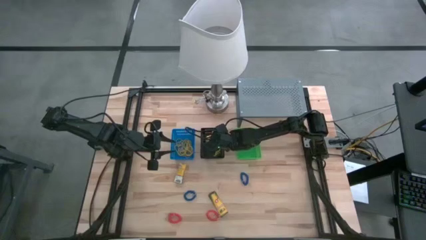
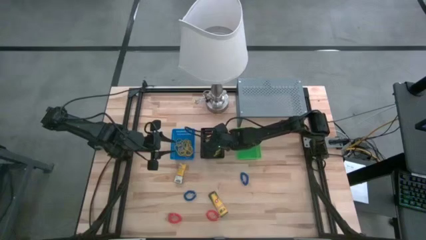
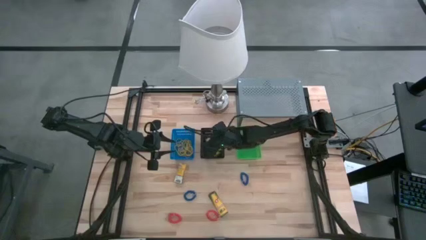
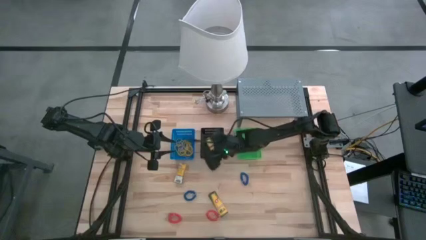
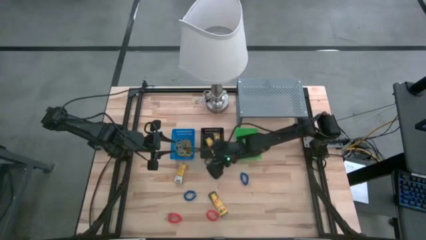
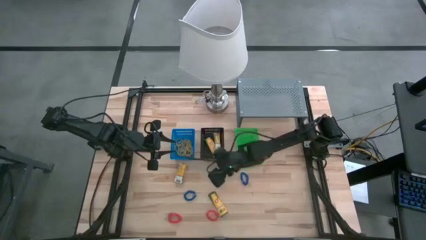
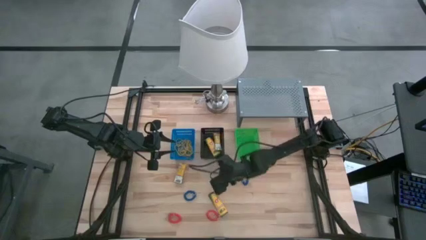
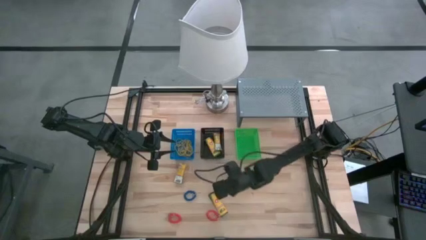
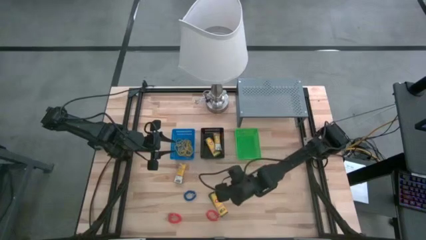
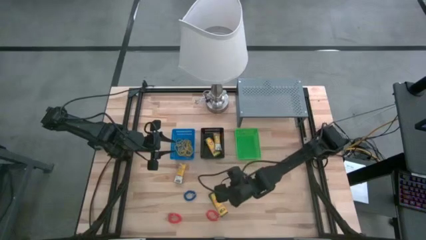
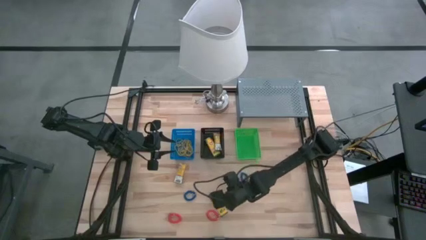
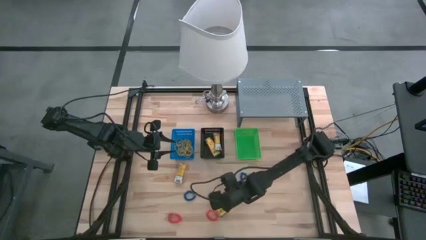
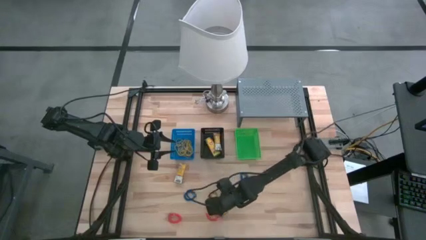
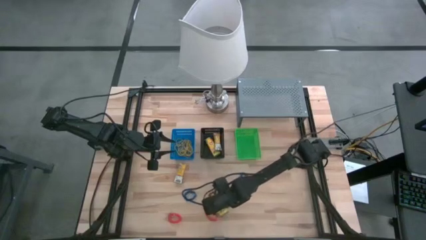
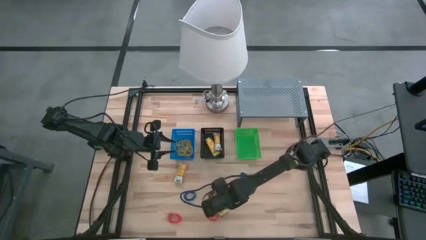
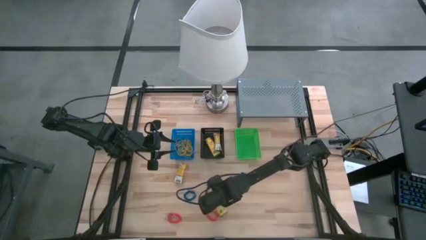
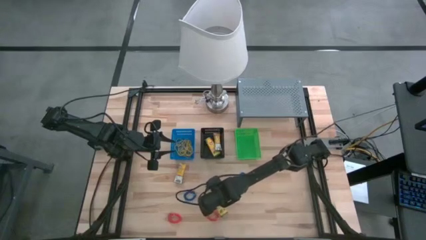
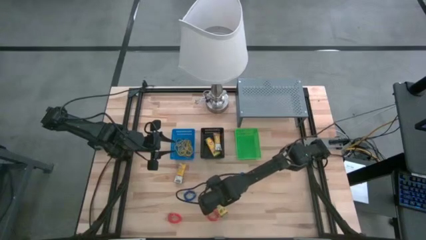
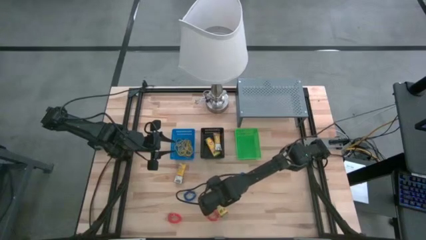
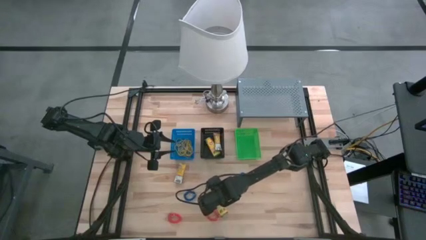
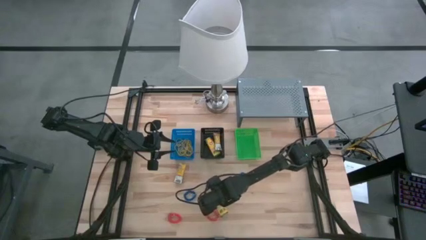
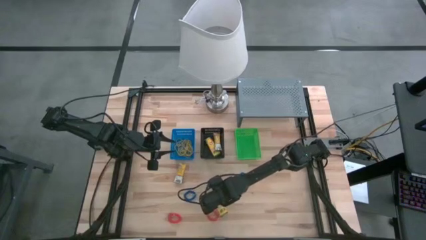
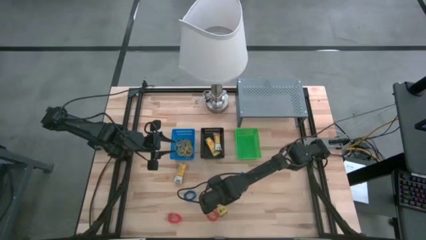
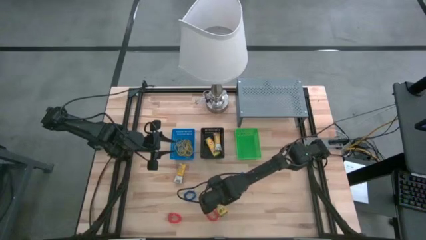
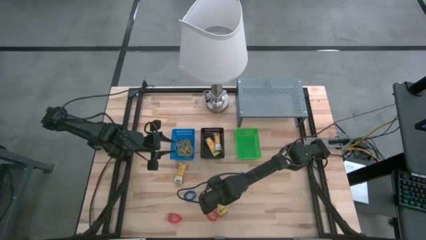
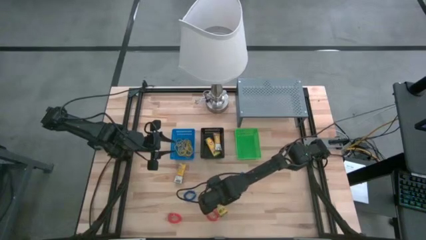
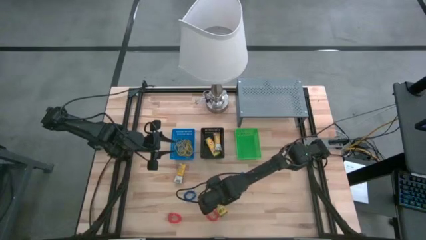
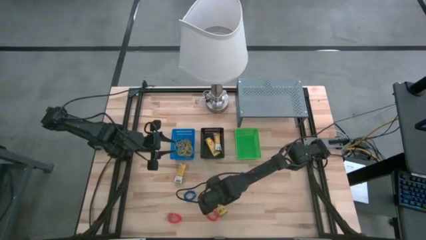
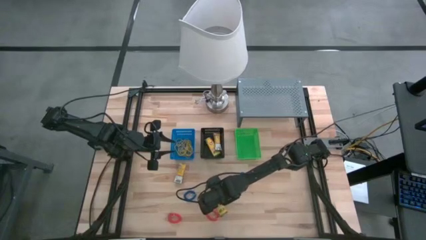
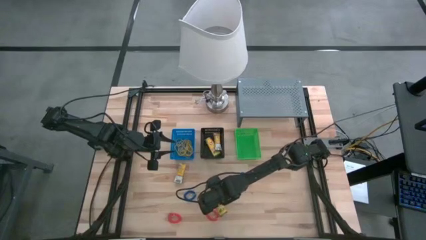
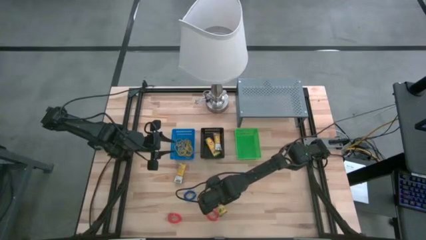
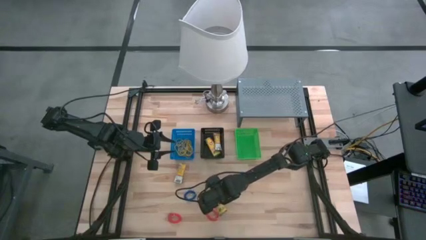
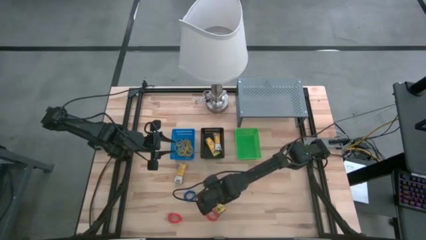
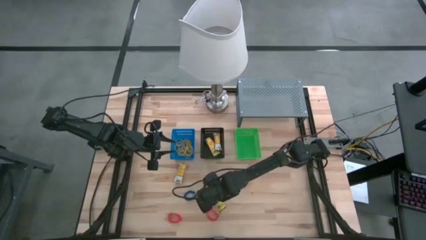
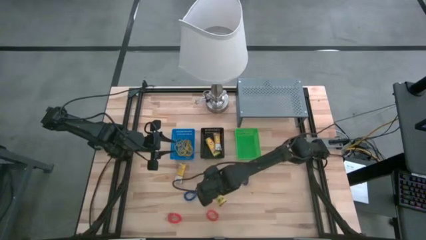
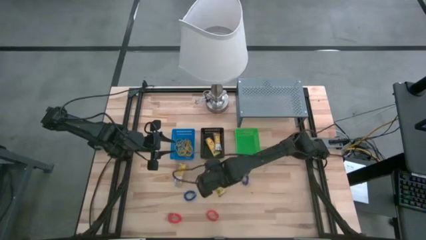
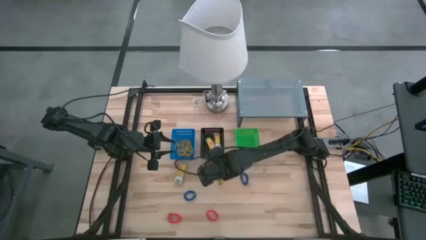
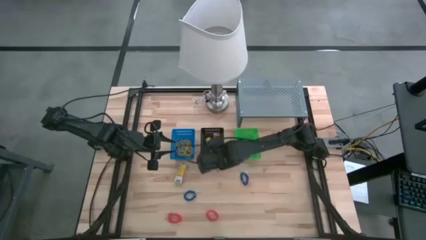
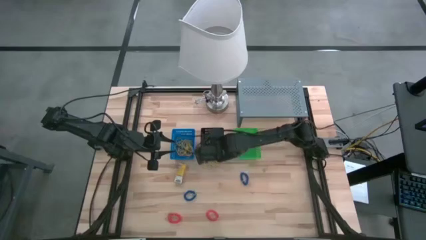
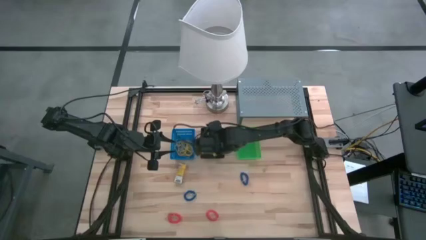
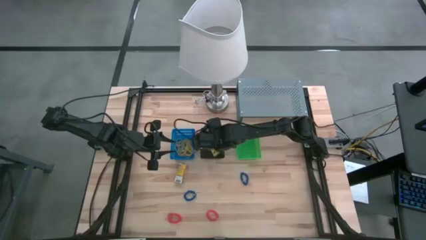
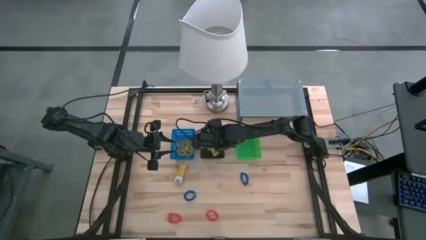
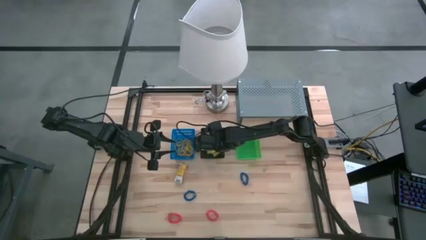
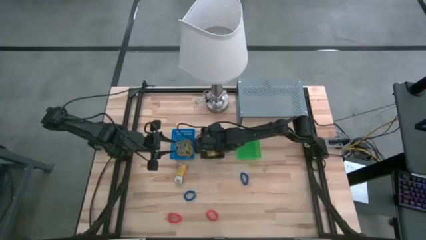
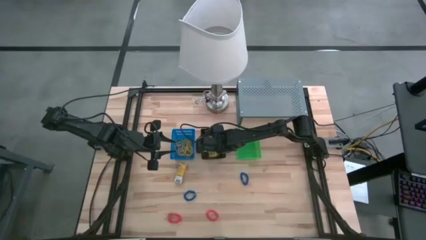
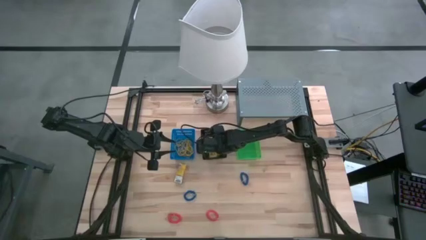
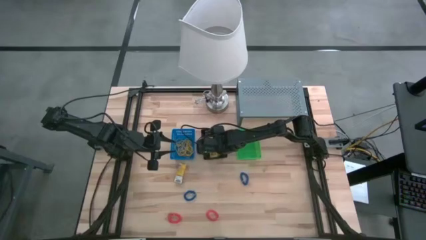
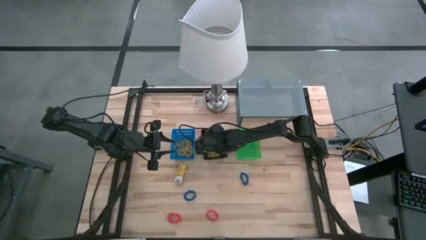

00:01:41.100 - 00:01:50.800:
Task: Pick & Place Office Desk Supplies
Put the yellow crayon box into the black bin

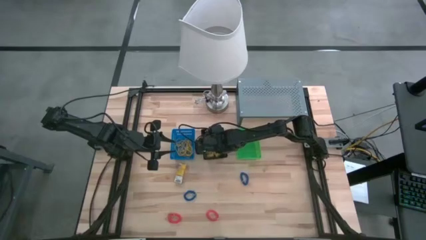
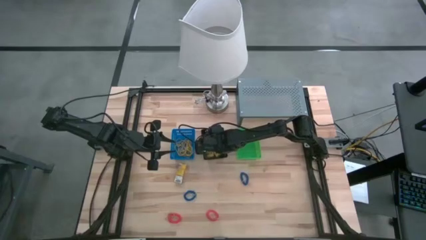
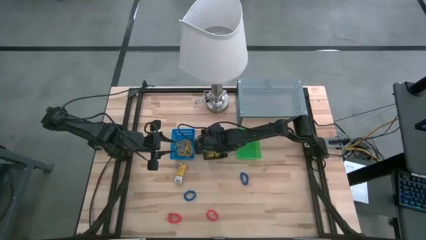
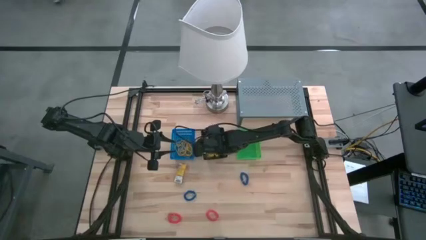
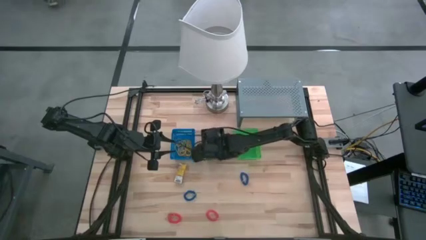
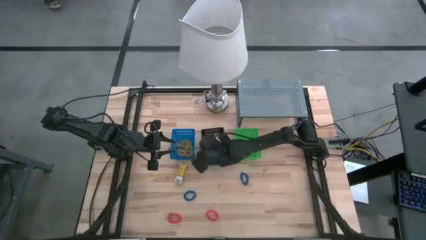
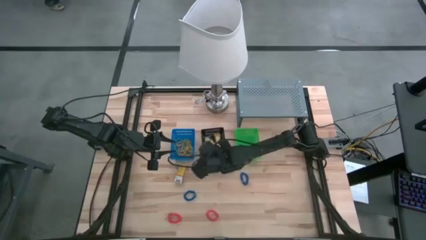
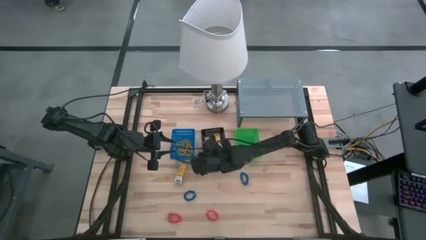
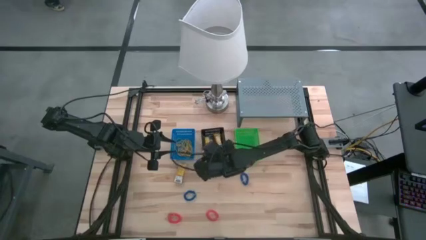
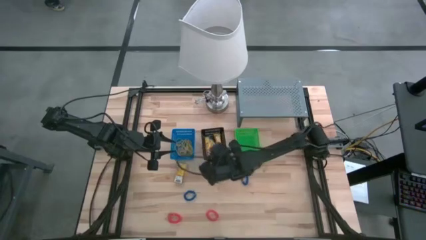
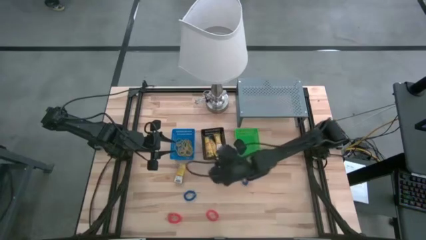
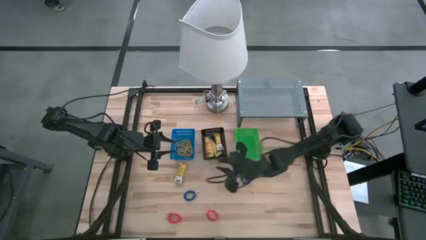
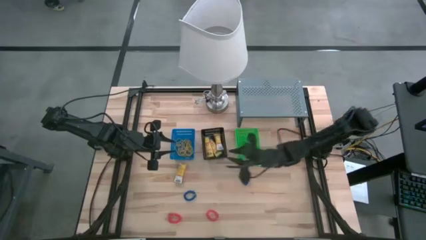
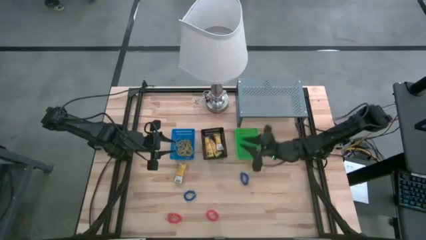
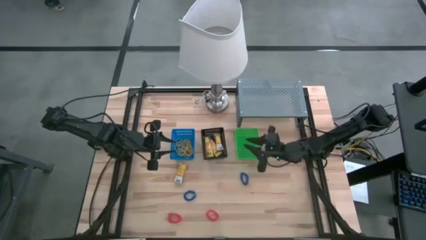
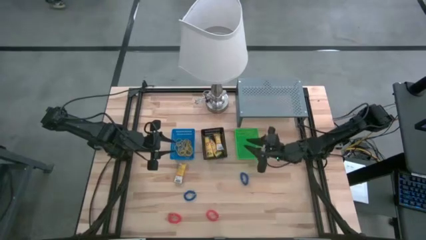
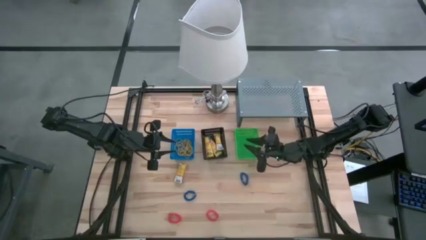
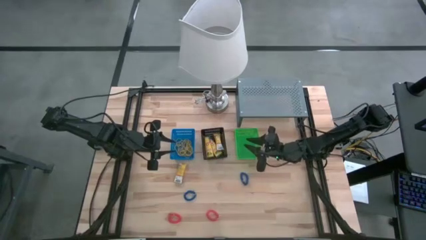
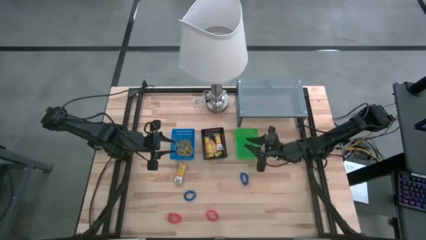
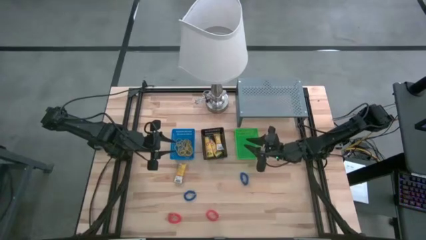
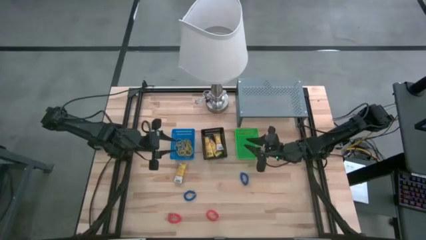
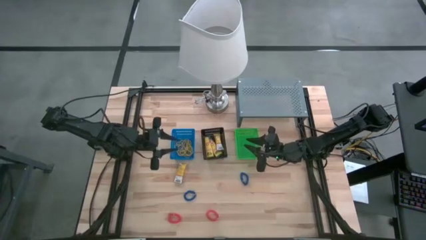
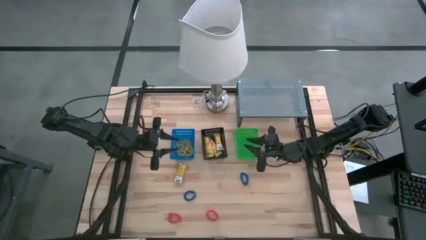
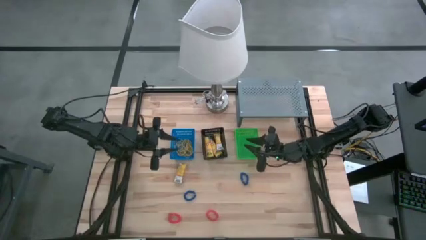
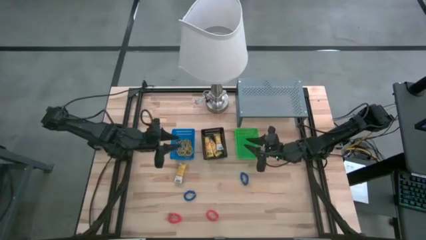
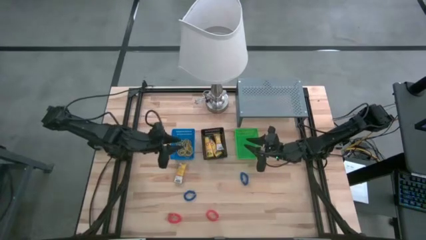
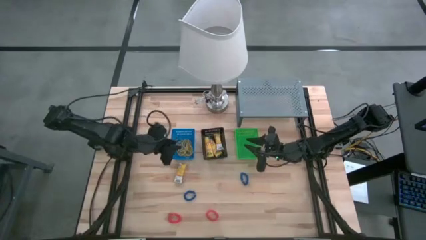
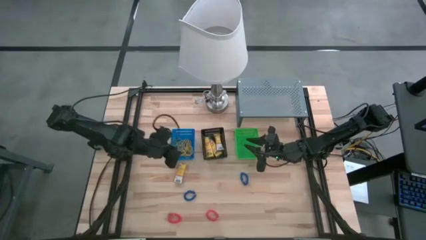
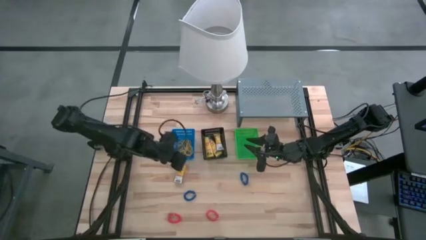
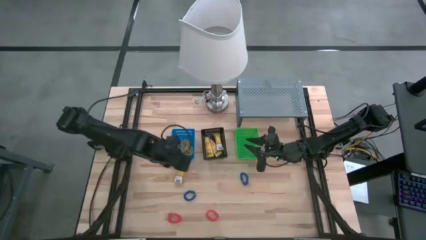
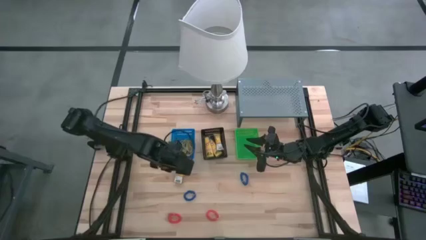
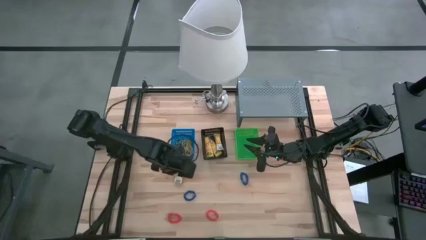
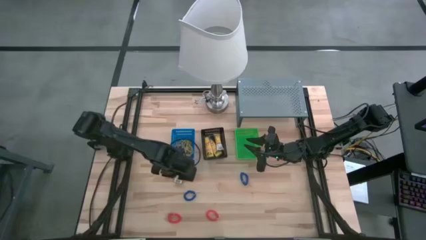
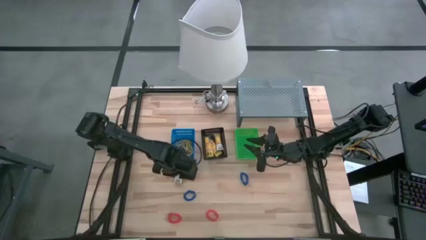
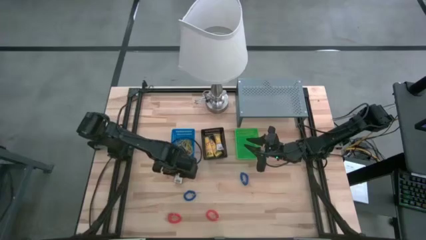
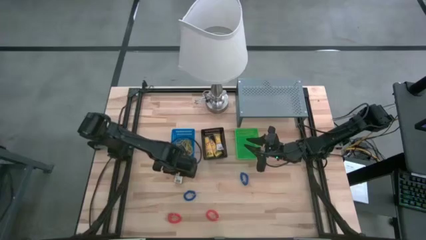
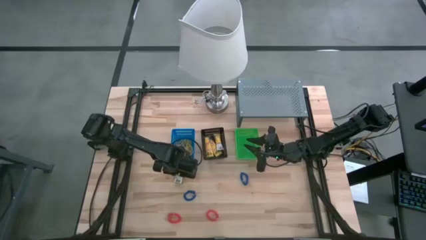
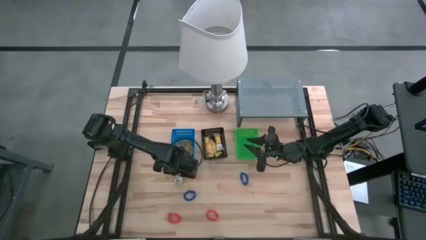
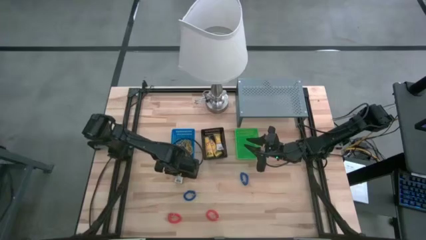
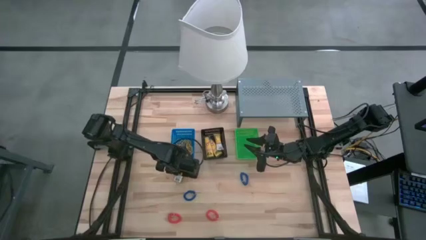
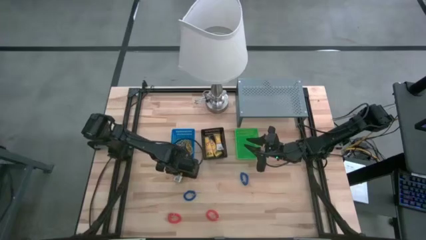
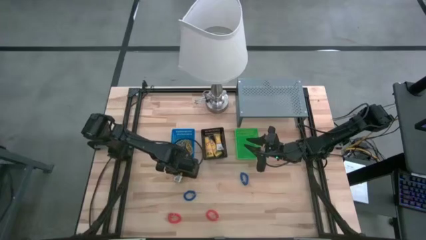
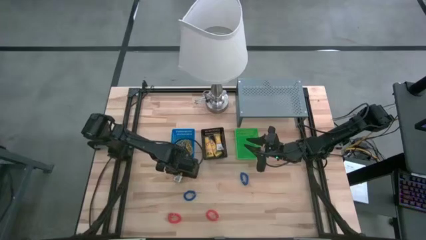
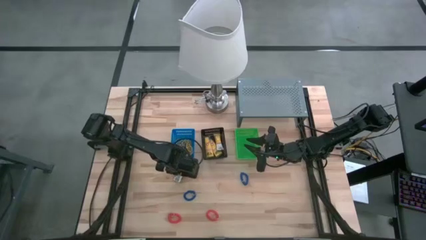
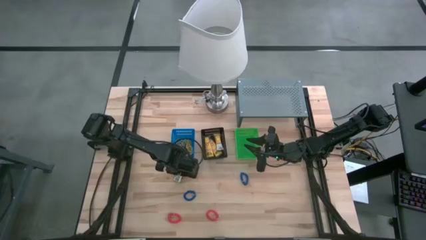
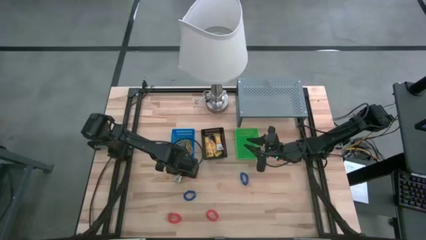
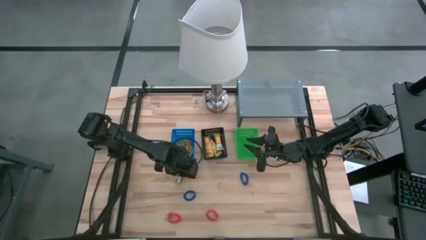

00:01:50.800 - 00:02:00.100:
Put the yellow crayon box into the black bin
